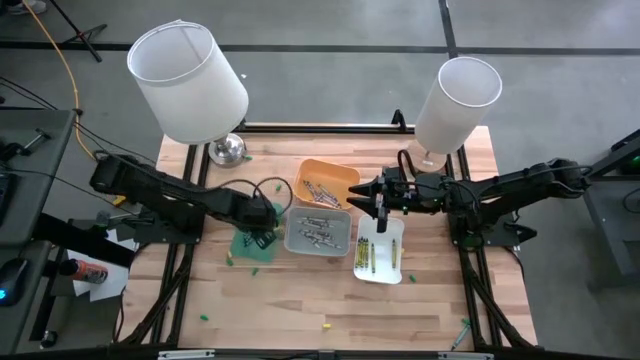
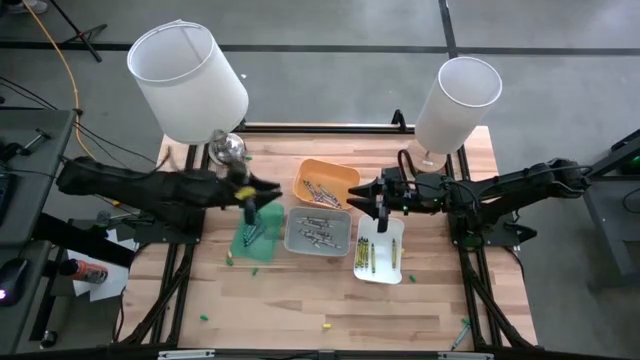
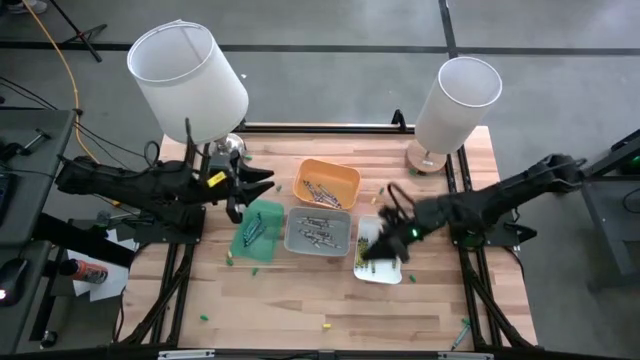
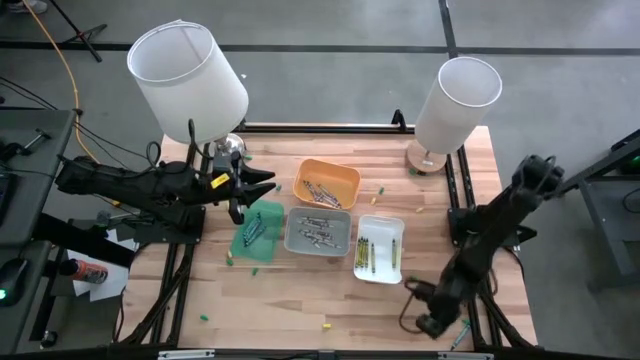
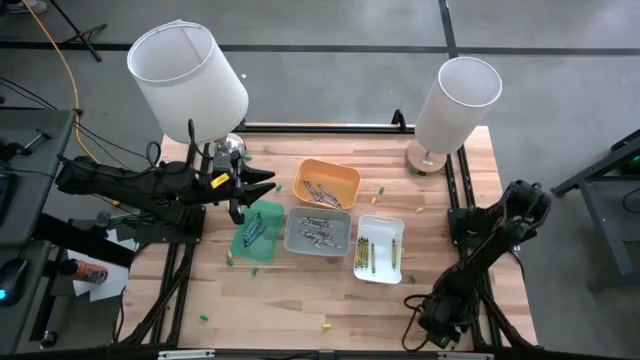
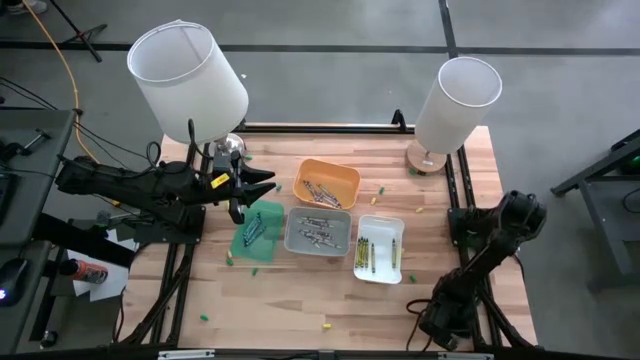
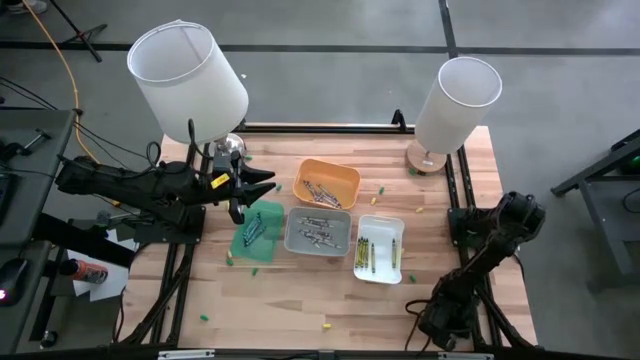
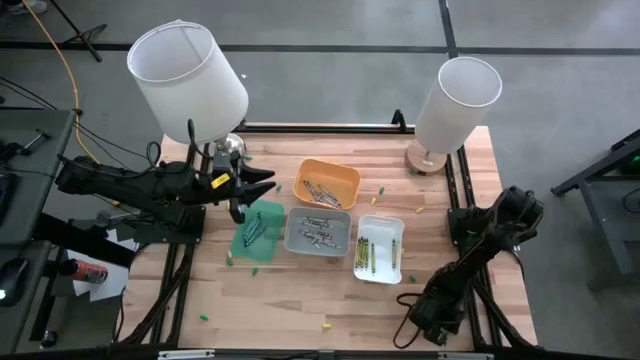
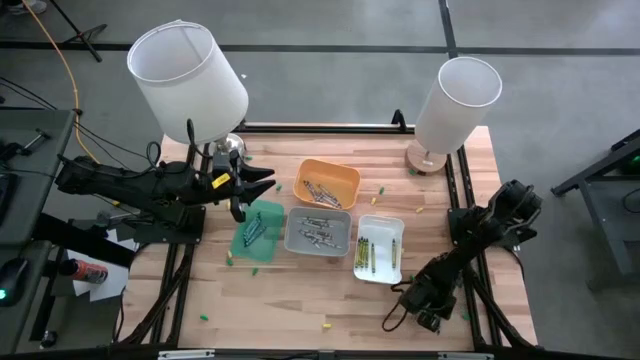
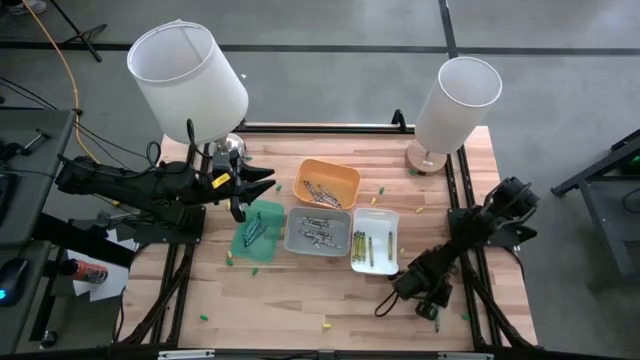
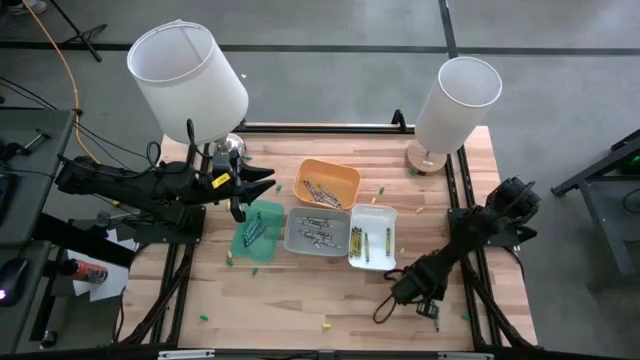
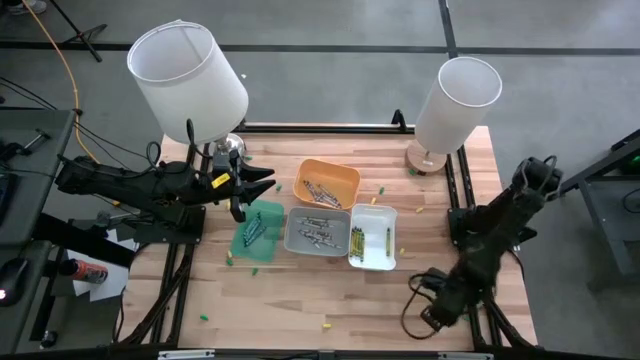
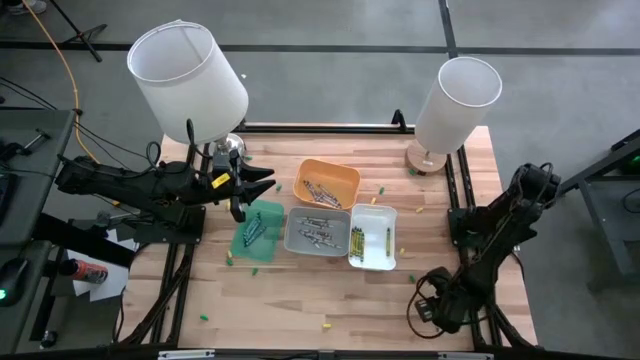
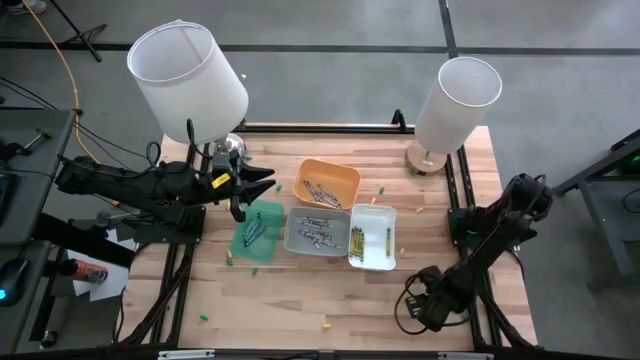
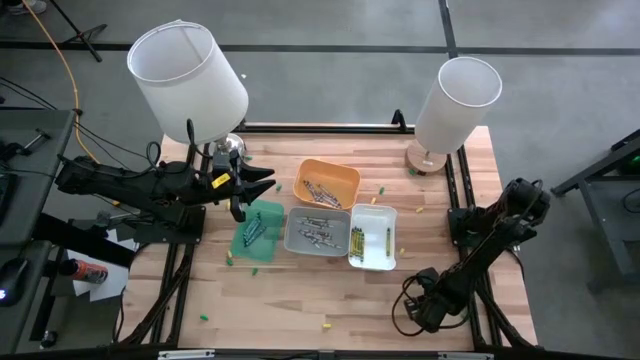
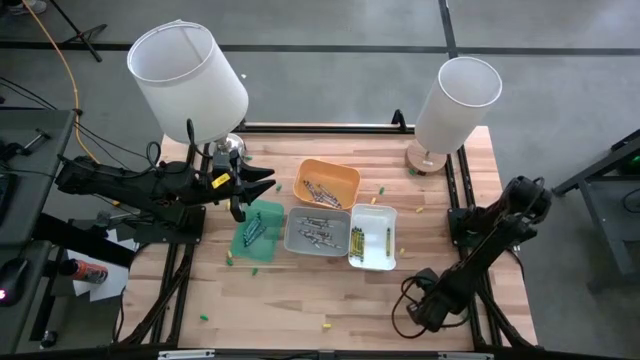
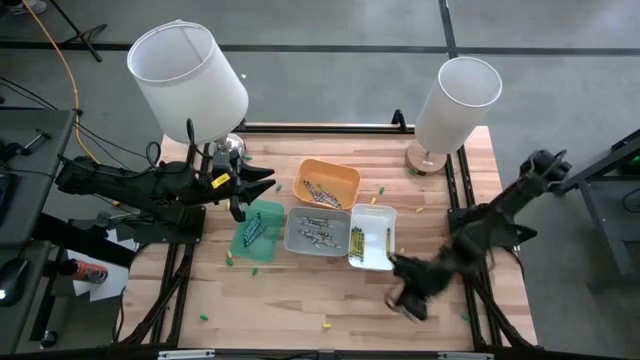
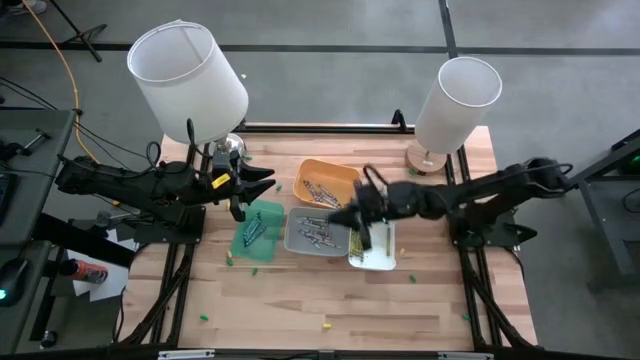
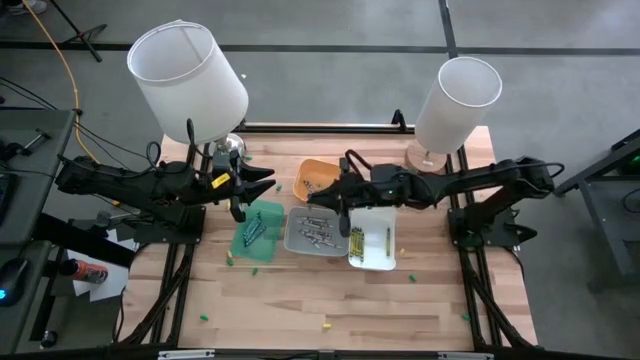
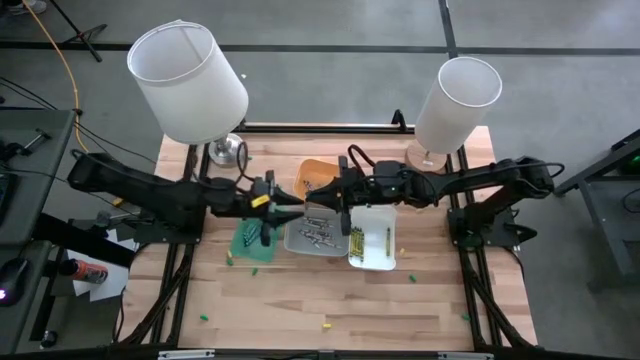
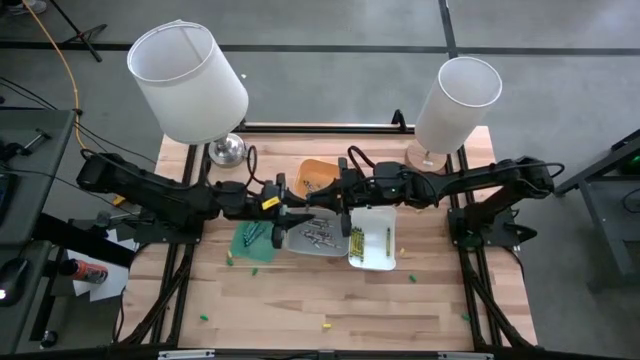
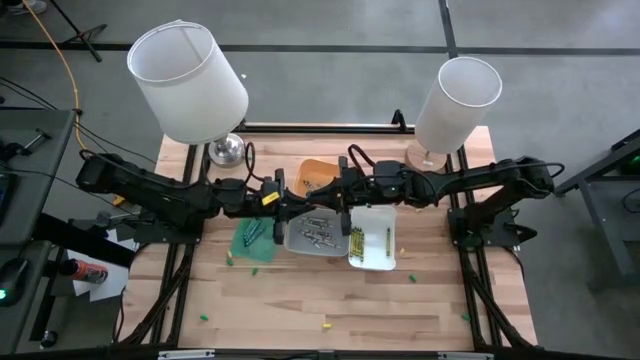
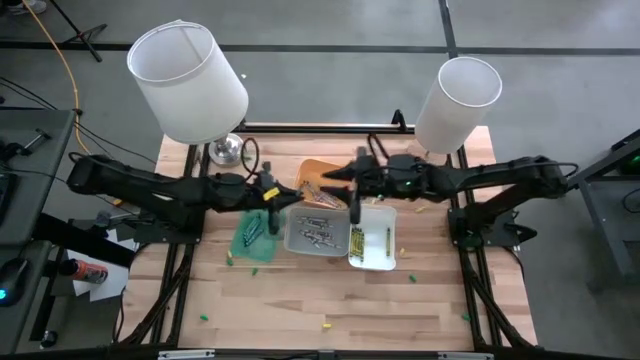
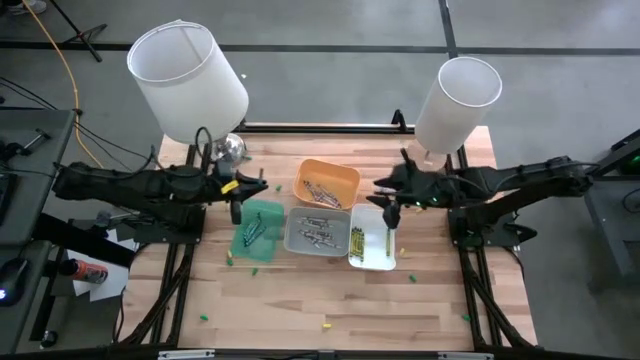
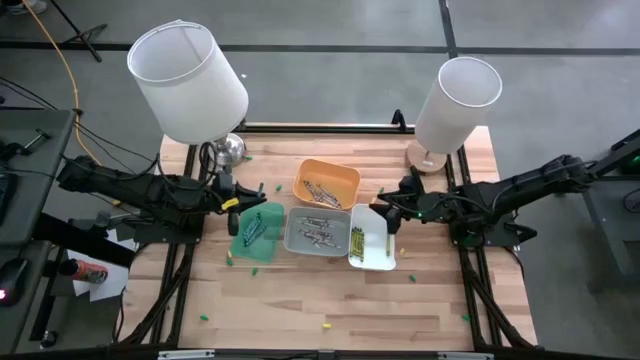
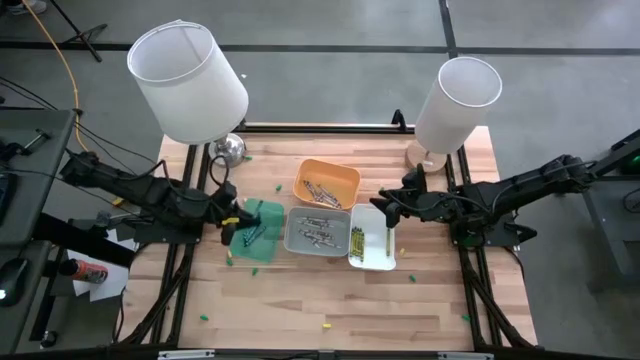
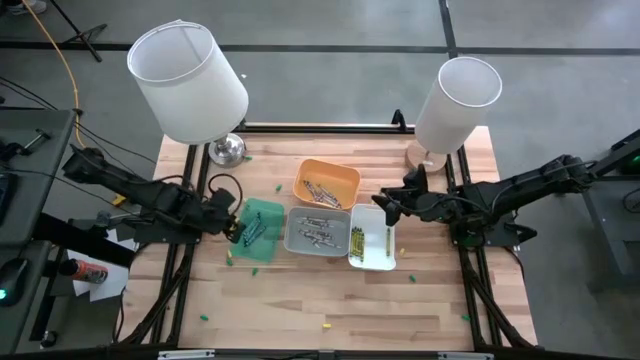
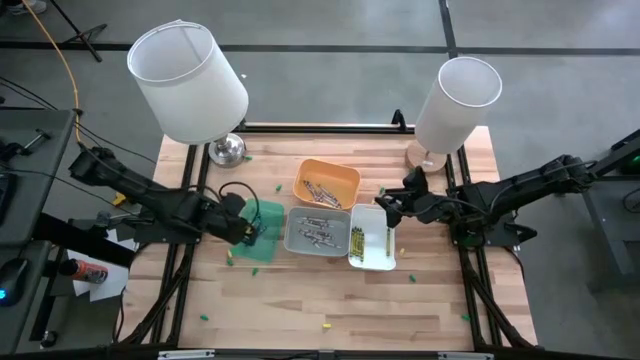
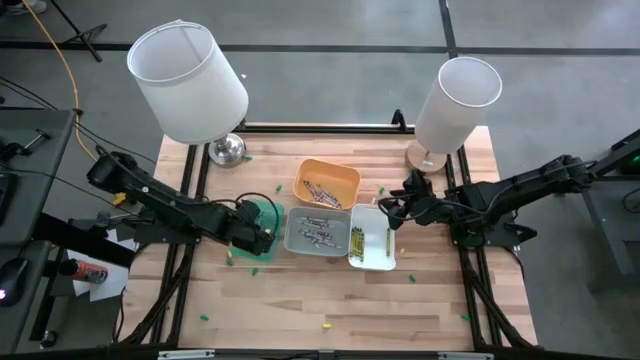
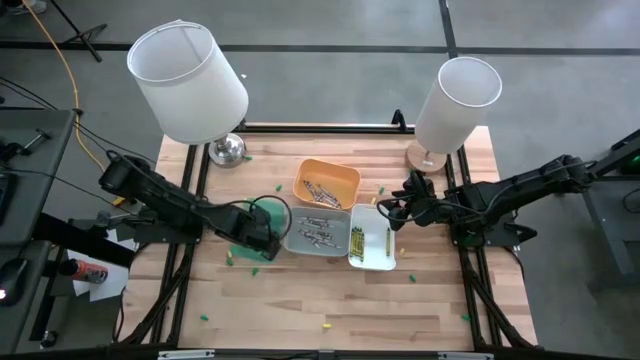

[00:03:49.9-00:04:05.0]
Task: Sort crayons
Put the blue crayon into the light blue bin

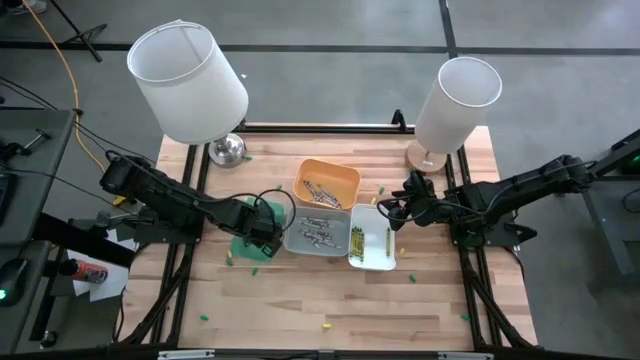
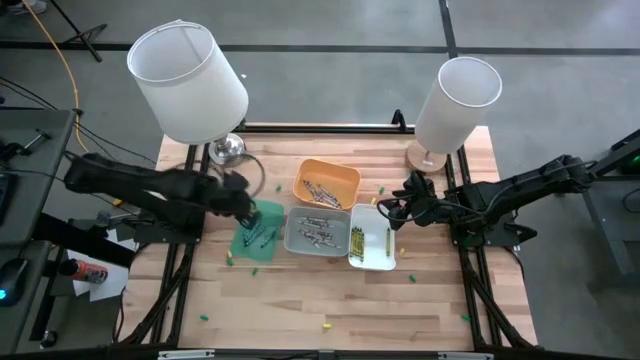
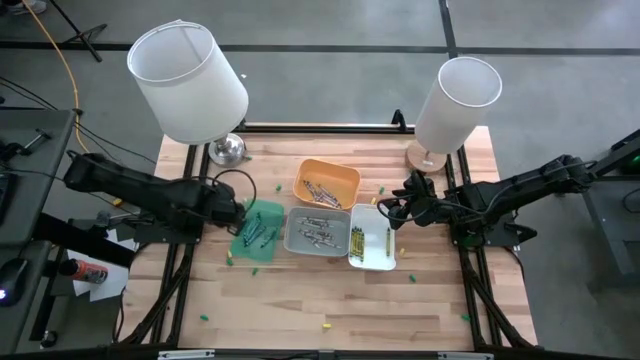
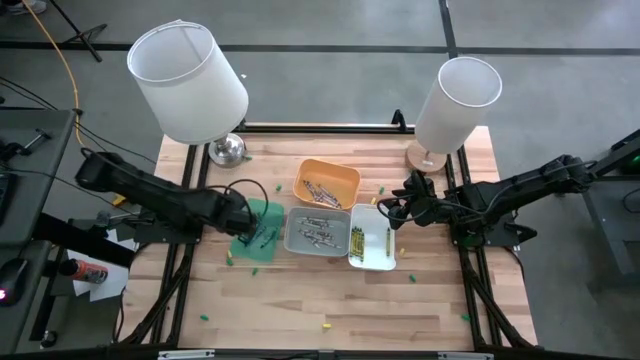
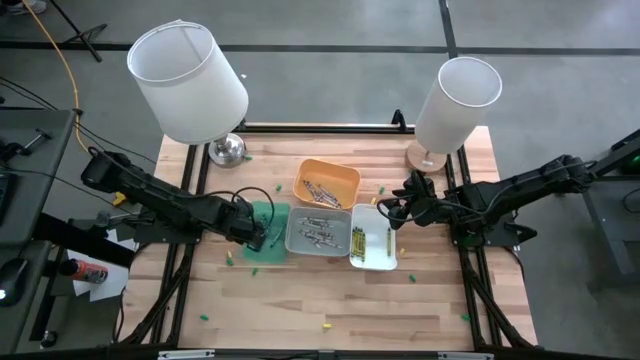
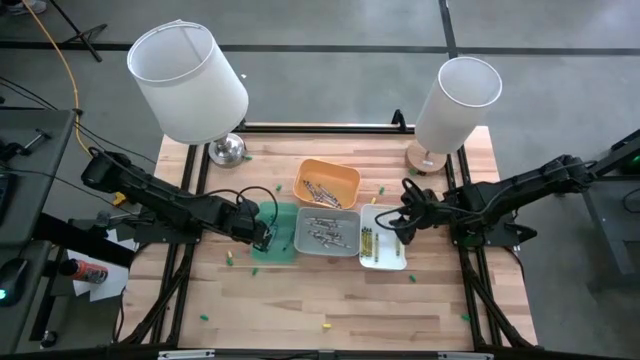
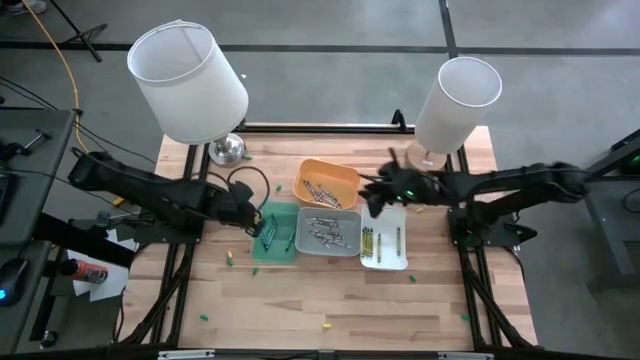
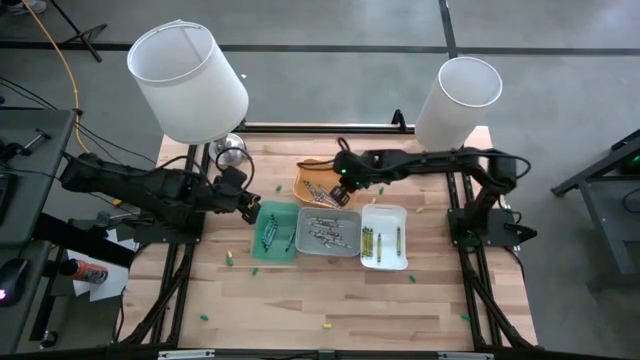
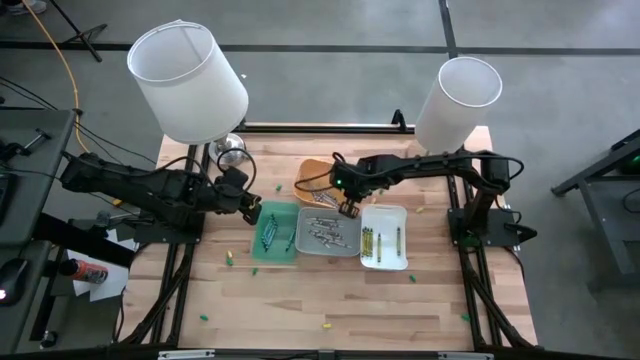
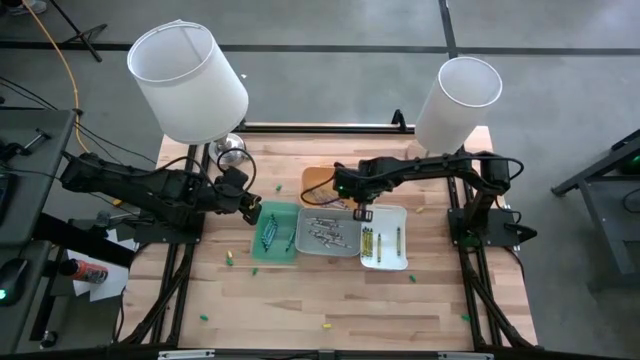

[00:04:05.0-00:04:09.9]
Adjust the bins on the table
